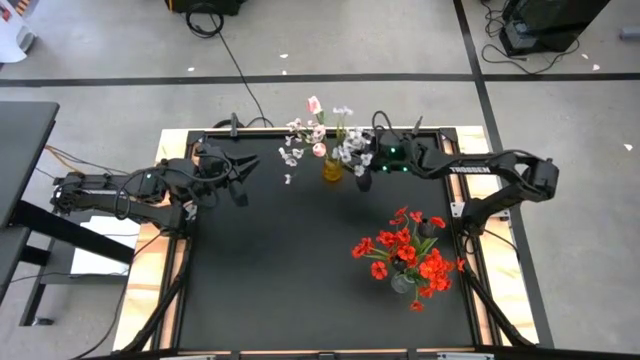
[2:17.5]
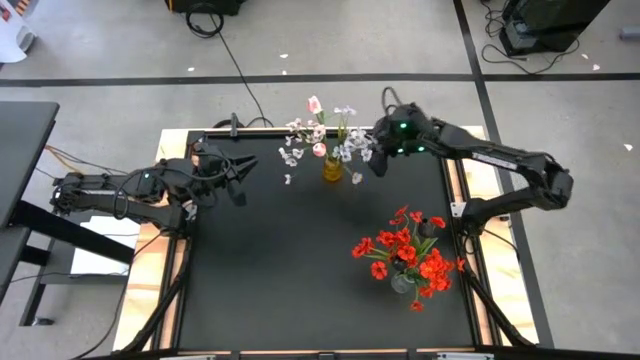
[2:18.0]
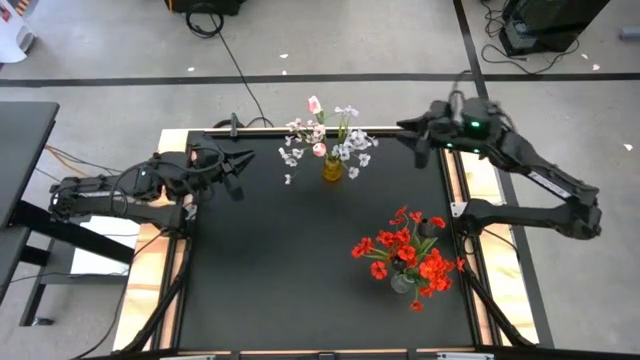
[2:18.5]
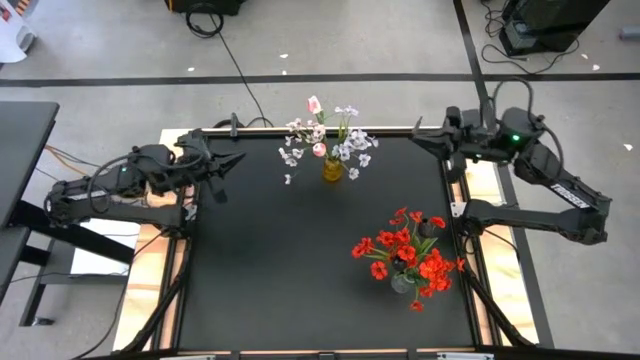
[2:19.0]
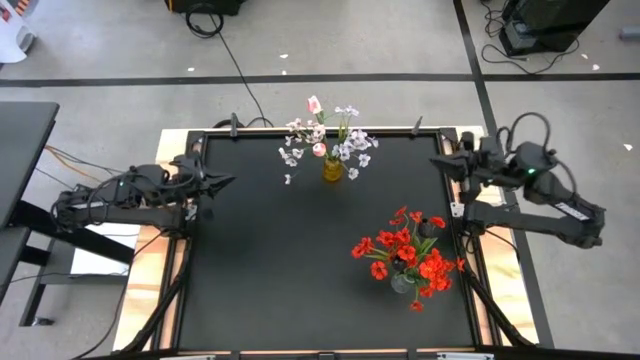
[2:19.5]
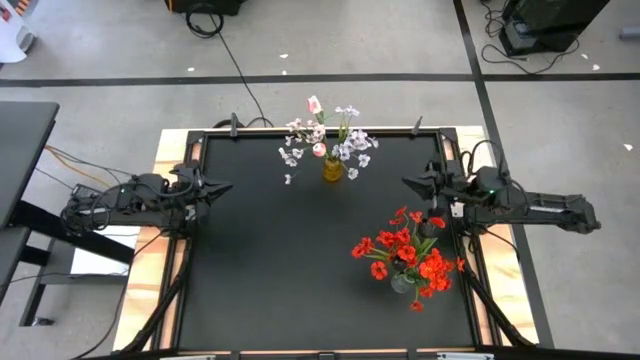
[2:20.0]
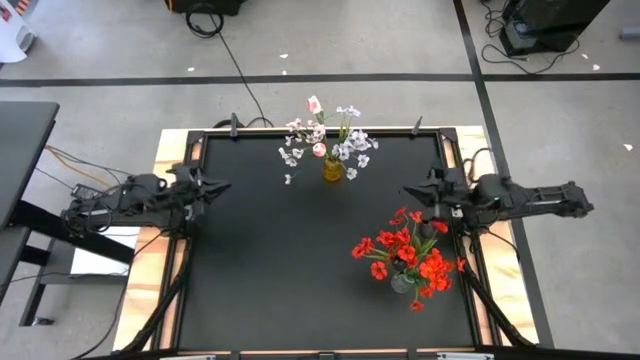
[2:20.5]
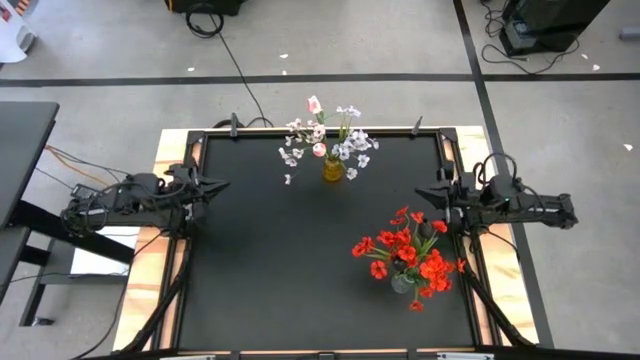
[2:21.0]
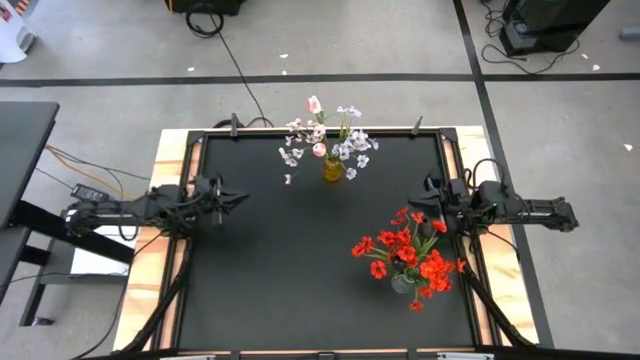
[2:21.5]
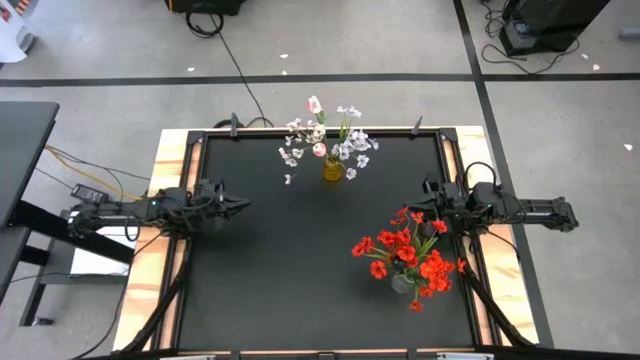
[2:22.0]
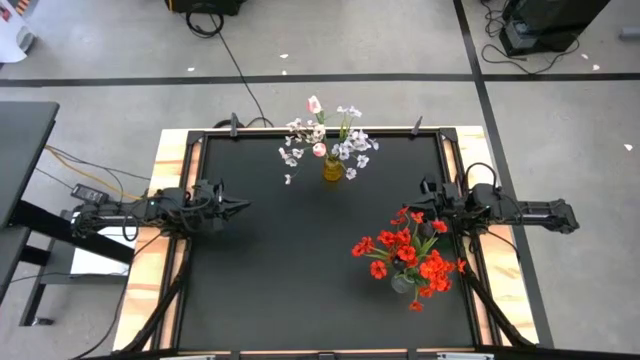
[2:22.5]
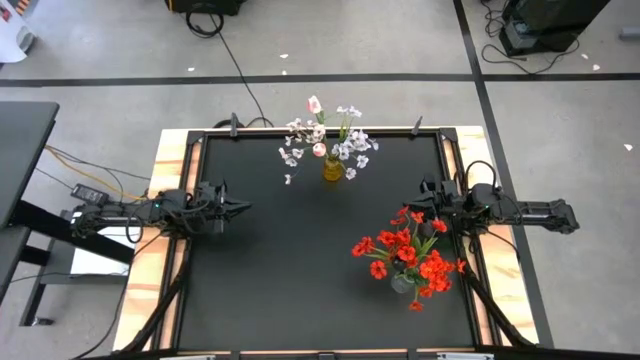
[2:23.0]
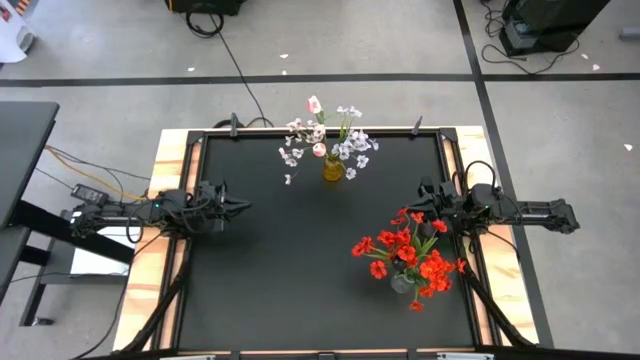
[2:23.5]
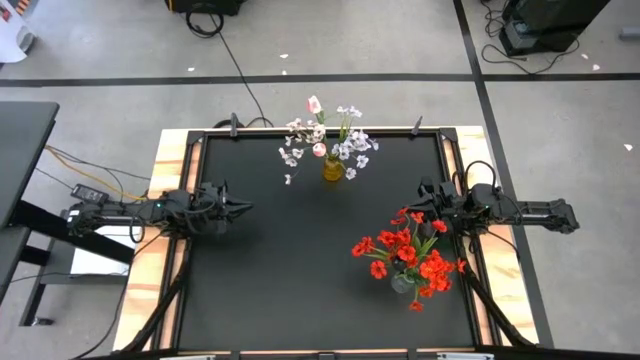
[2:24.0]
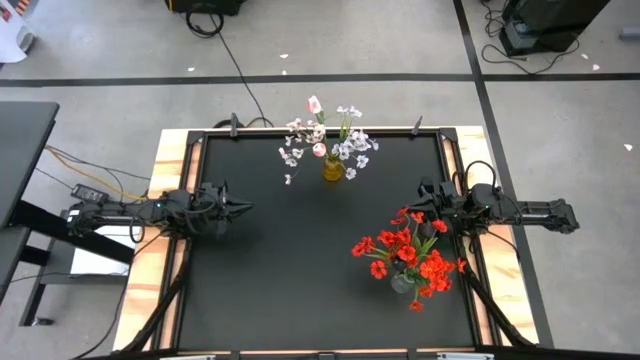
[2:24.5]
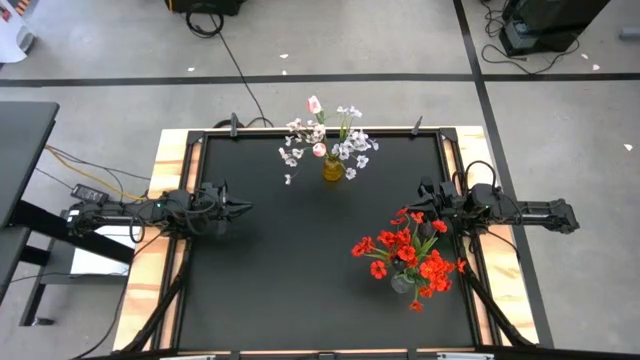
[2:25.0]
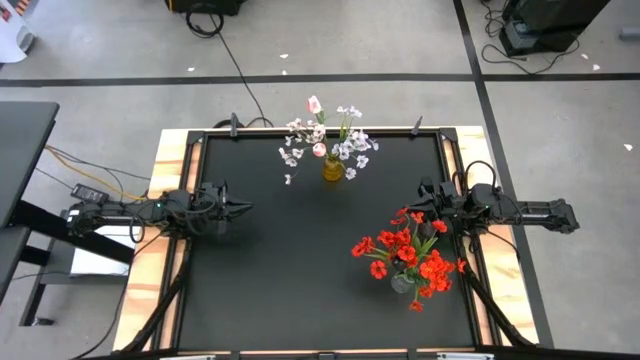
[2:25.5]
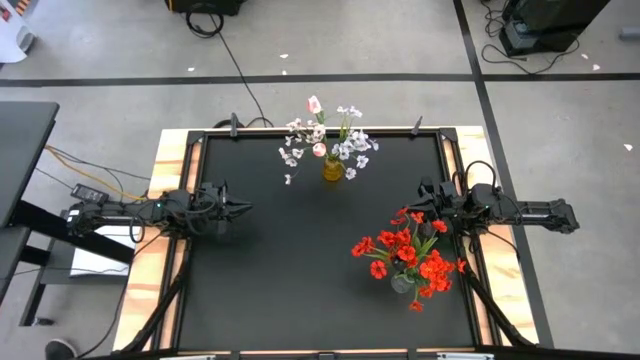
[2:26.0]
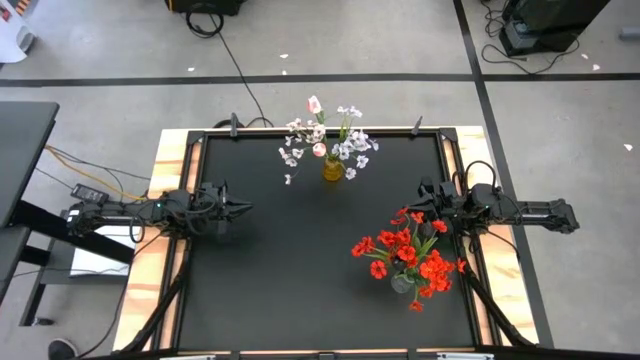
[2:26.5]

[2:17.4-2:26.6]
Task: Sort flowers into vase by color
Return to Home Position

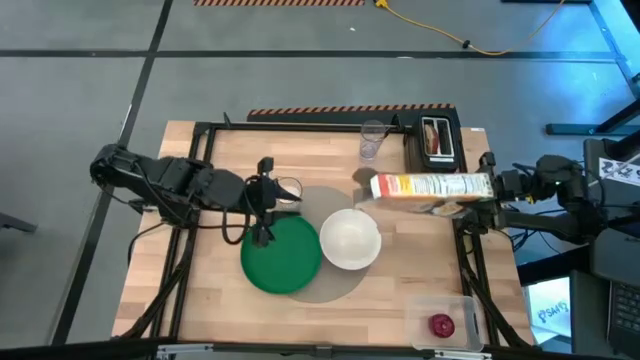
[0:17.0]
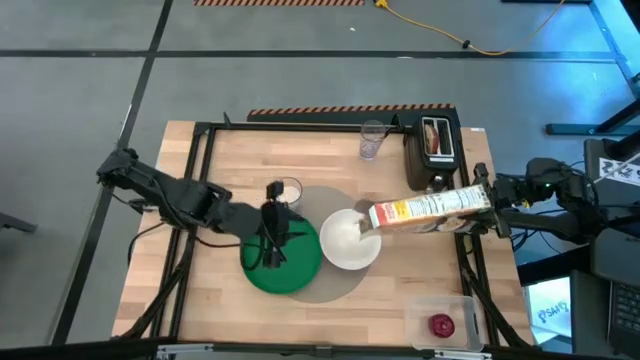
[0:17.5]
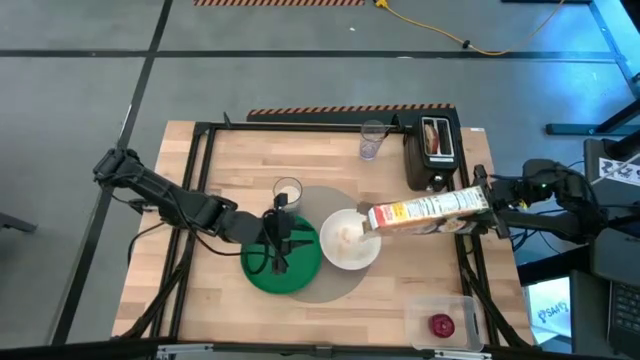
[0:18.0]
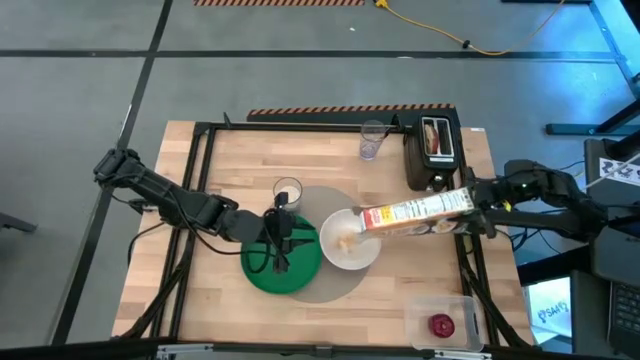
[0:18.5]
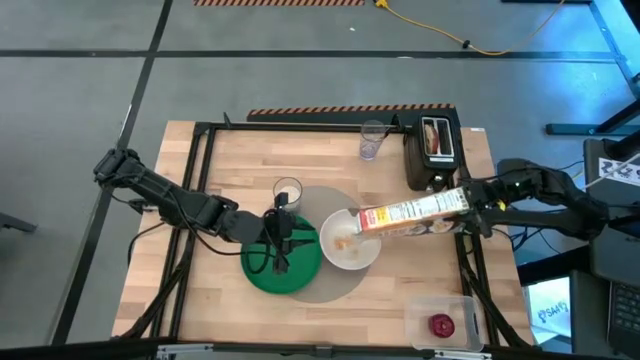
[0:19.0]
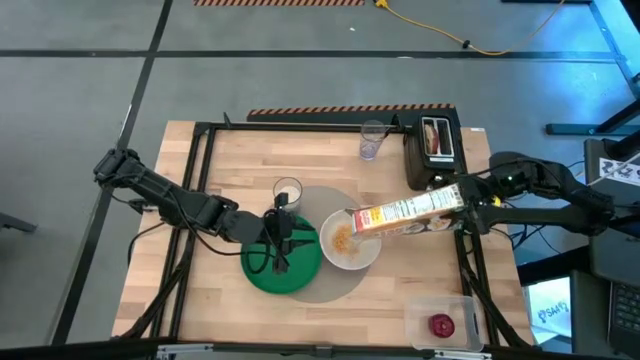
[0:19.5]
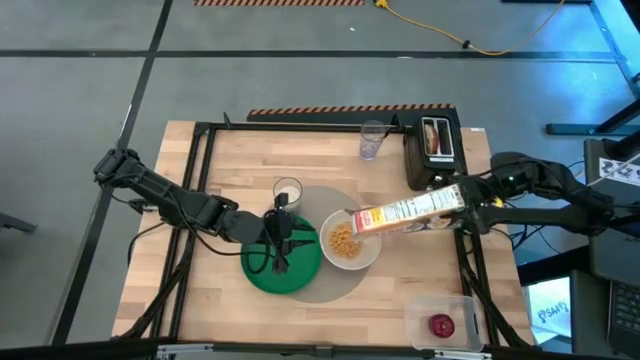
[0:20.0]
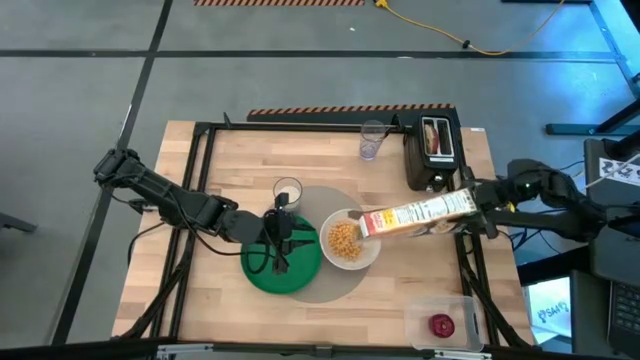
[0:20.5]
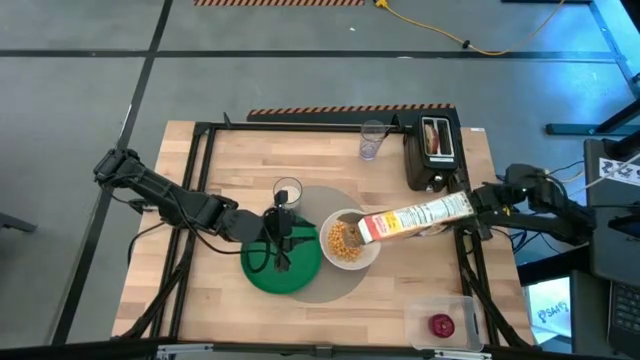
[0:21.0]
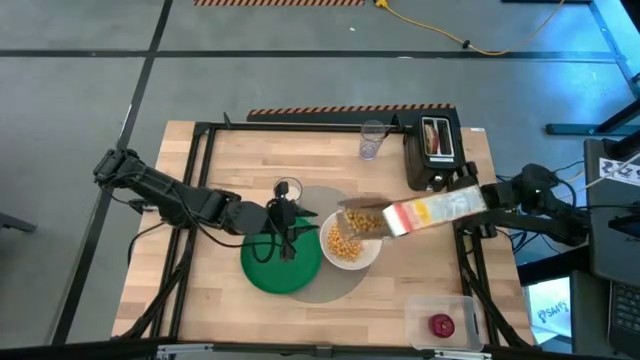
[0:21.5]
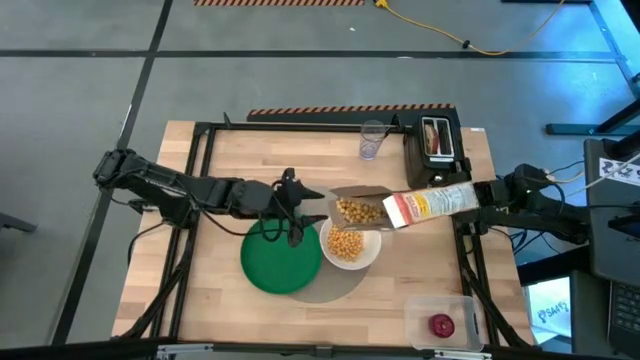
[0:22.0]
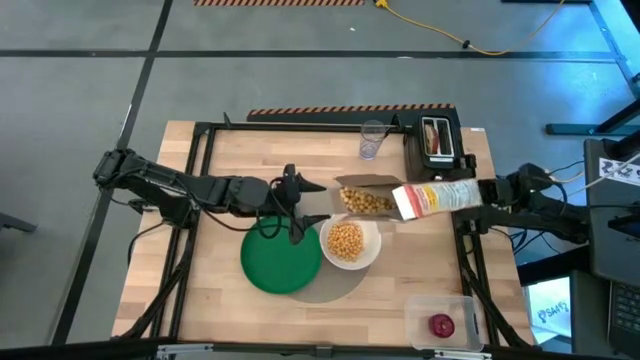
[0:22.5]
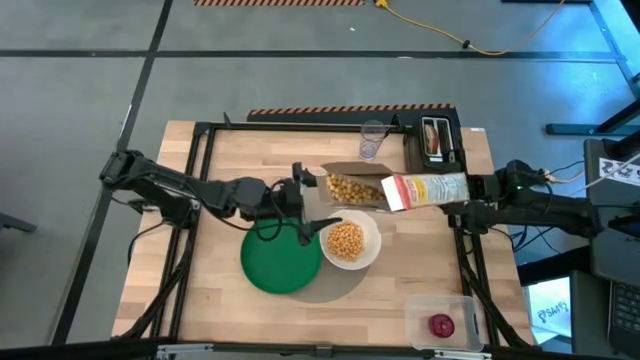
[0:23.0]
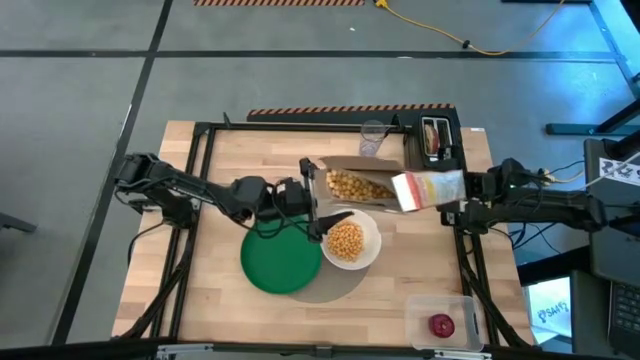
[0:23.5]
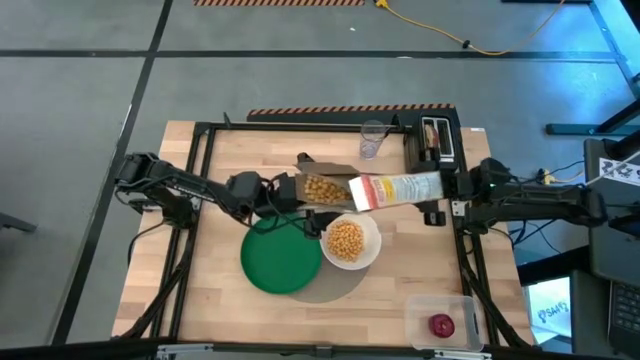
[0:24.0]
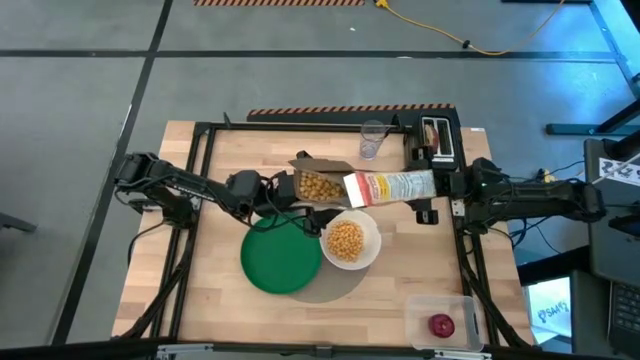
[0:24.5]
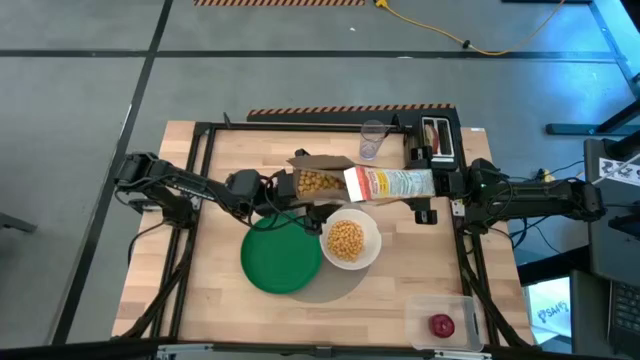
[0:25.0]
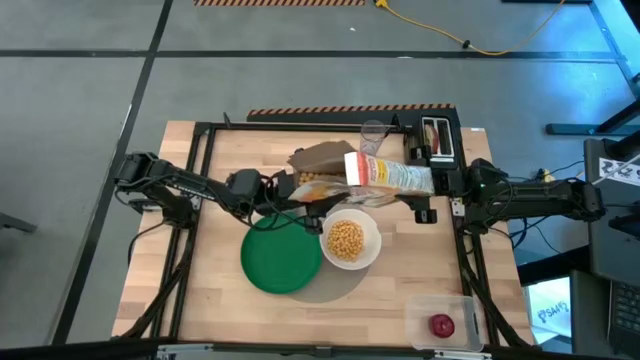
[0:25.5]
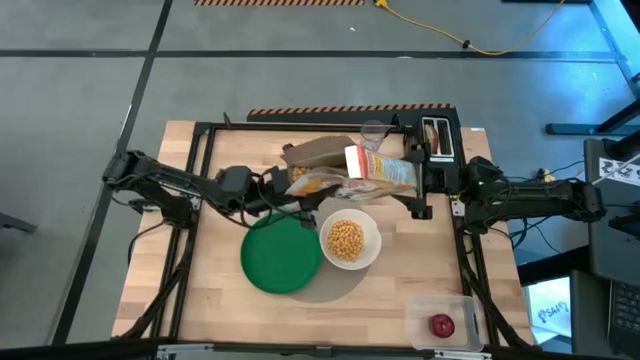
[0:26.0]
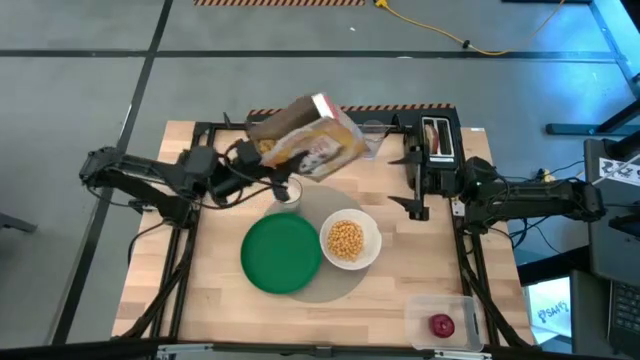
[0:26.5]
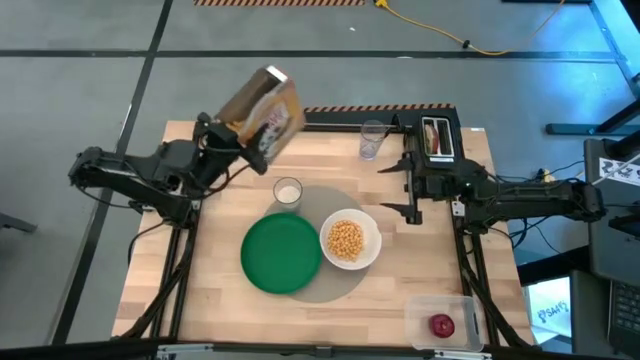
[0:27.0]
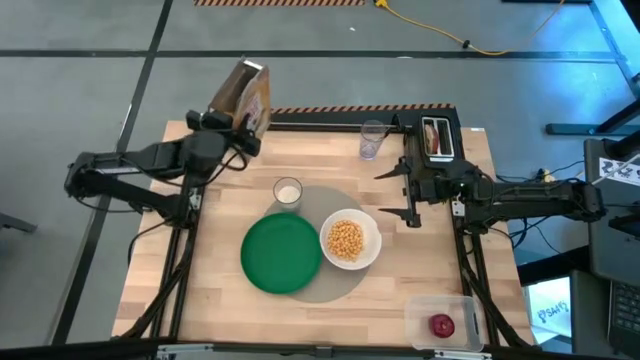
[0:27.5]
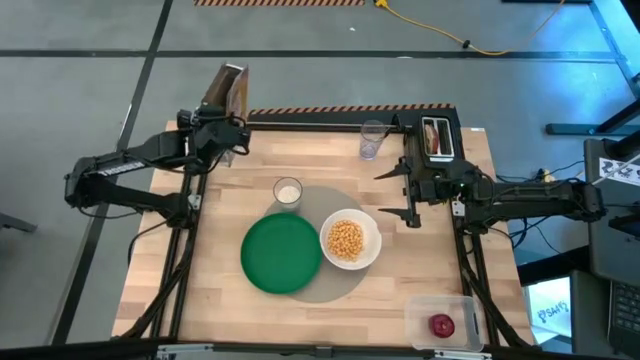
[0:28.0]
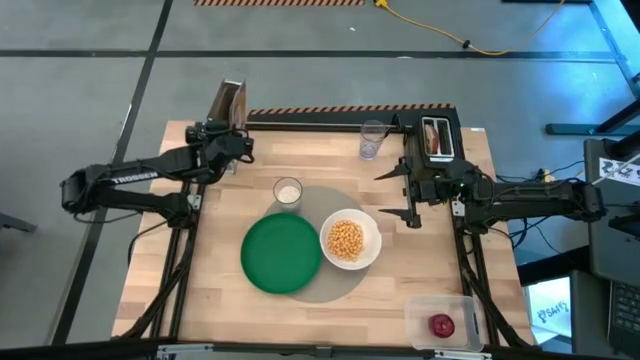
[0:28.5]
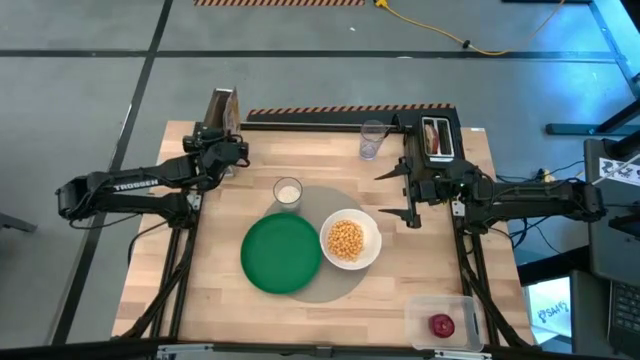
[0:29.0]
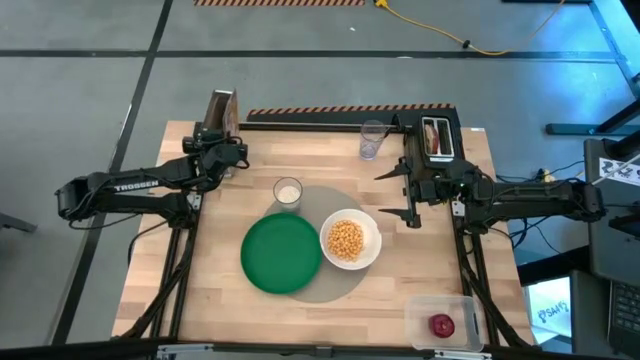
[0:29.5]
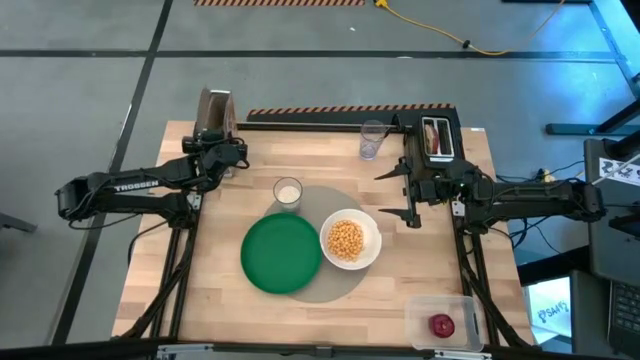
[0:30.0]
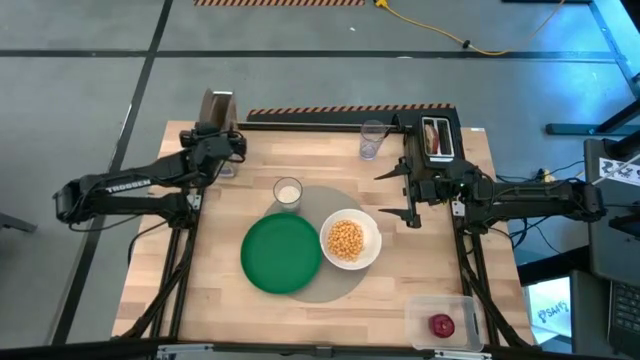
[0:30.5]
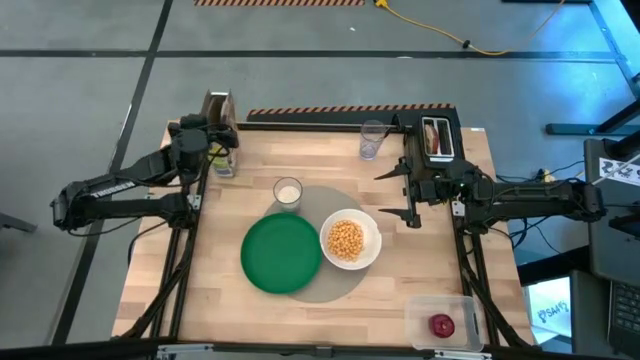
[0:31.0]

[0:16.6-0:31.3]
Task: Arrange a breakfast setting
Pour the cereals from cereal box into the white bowl
